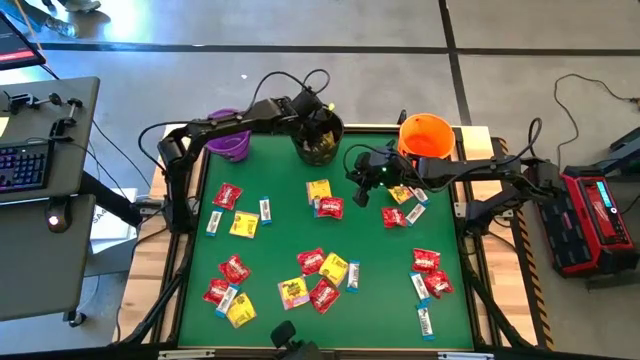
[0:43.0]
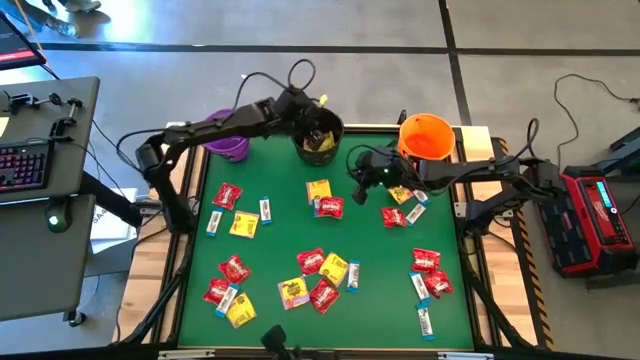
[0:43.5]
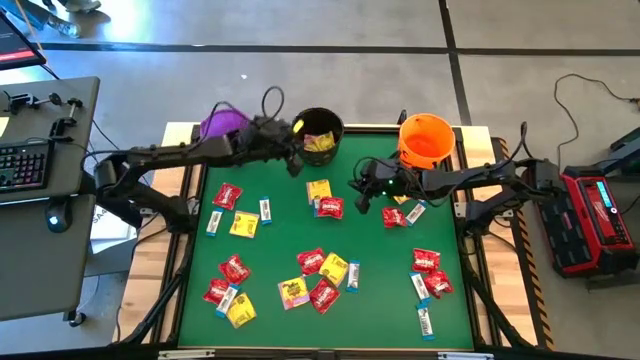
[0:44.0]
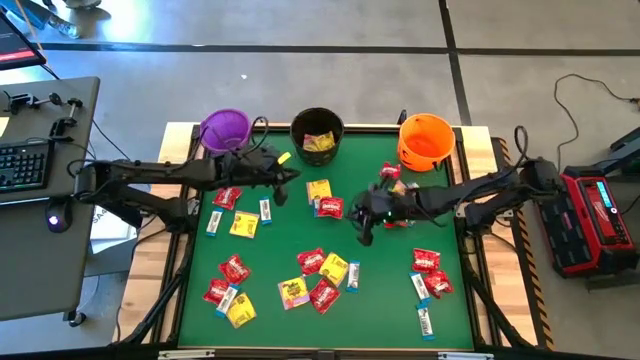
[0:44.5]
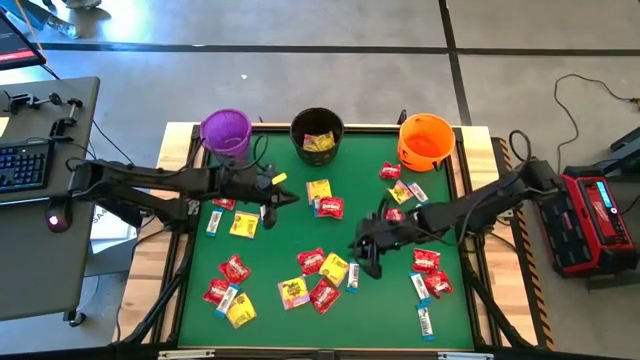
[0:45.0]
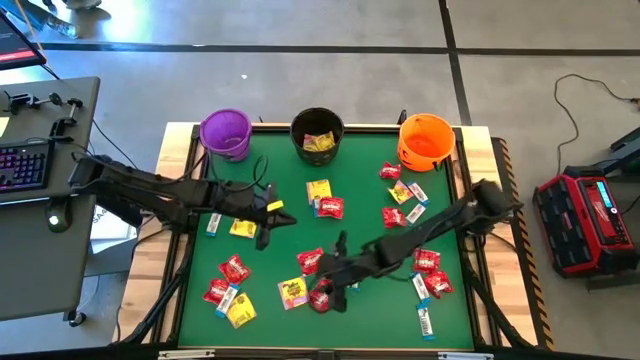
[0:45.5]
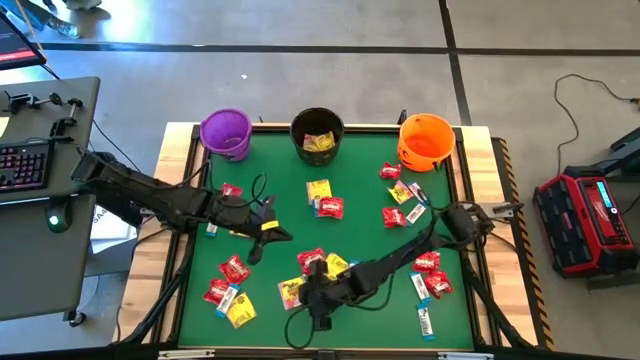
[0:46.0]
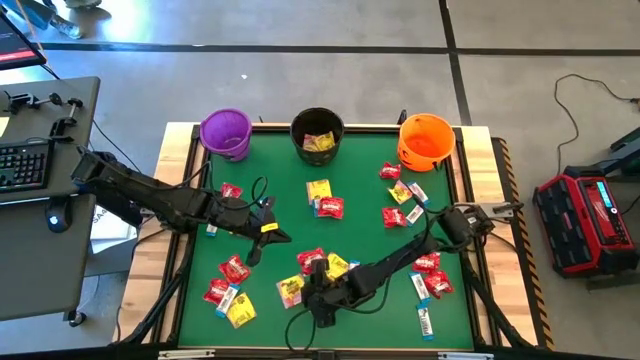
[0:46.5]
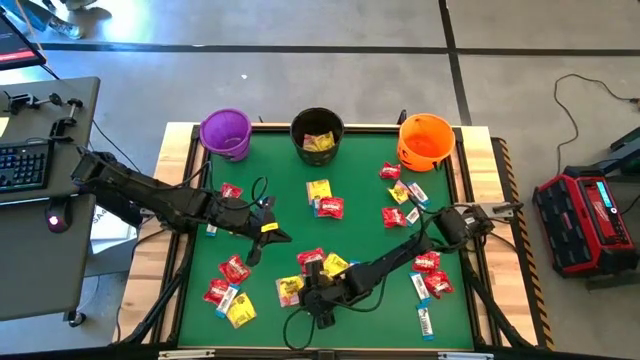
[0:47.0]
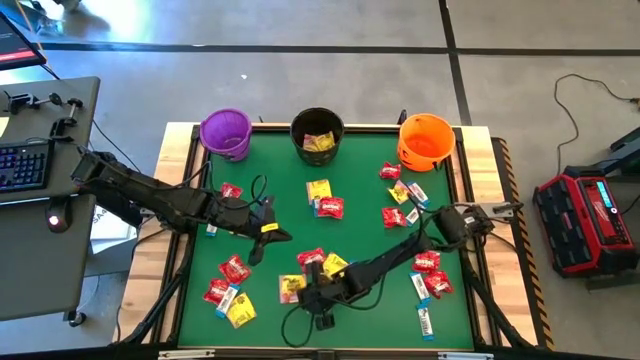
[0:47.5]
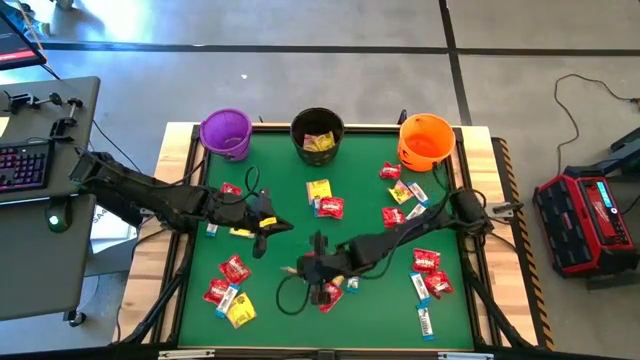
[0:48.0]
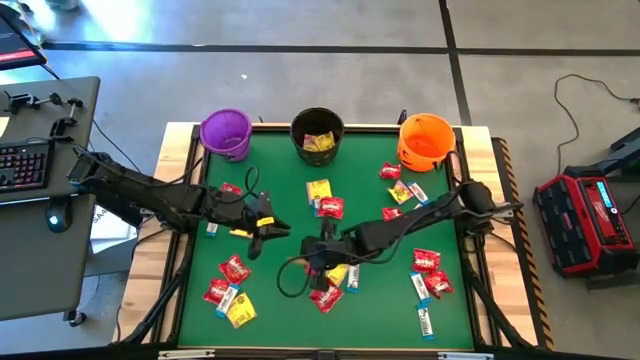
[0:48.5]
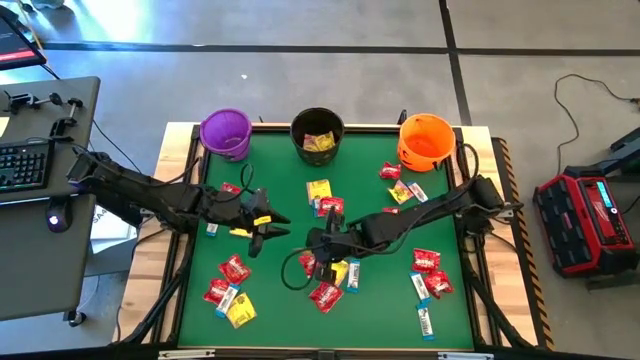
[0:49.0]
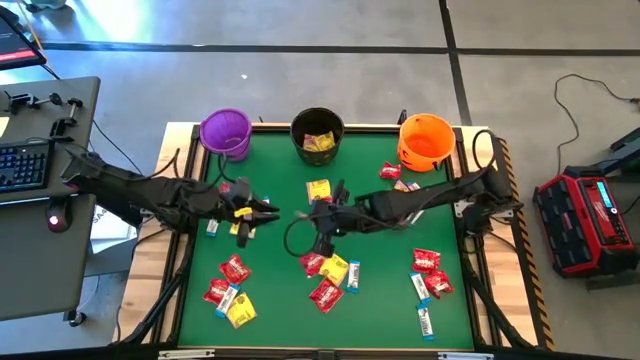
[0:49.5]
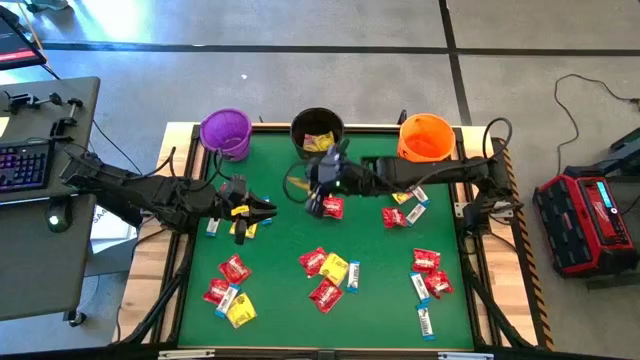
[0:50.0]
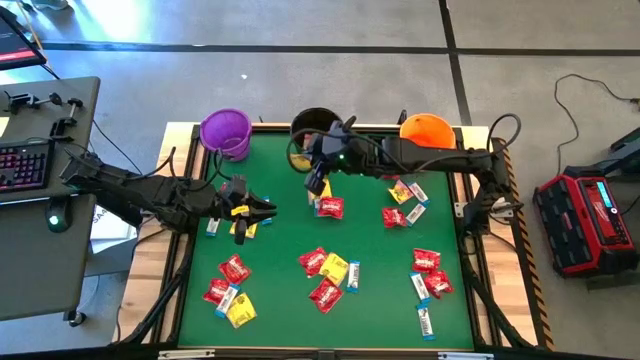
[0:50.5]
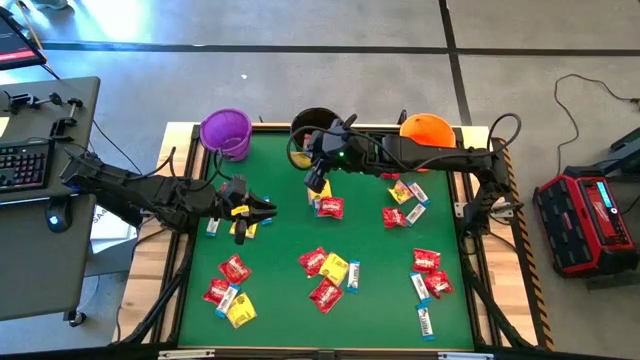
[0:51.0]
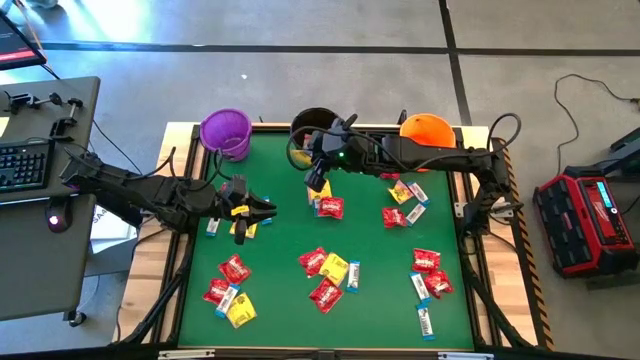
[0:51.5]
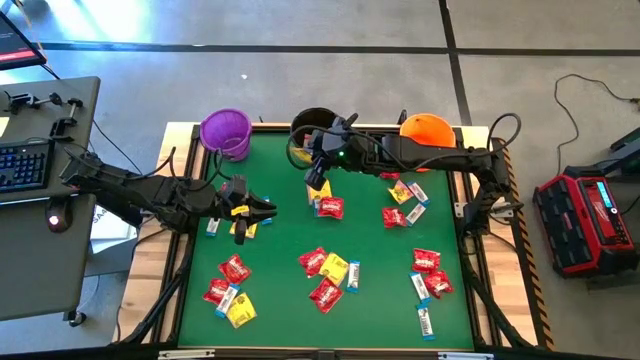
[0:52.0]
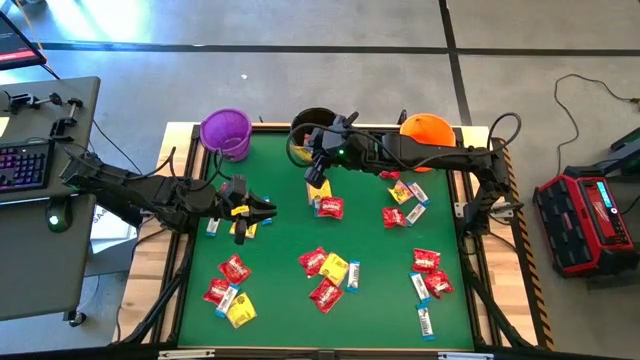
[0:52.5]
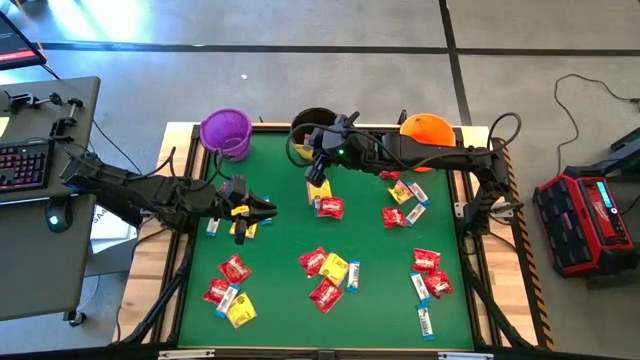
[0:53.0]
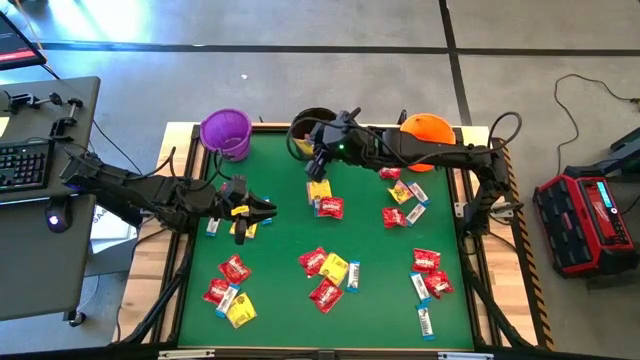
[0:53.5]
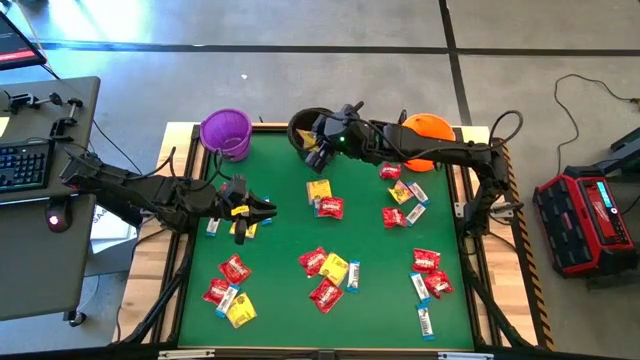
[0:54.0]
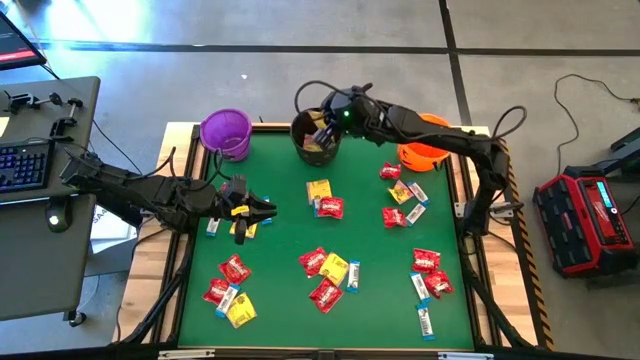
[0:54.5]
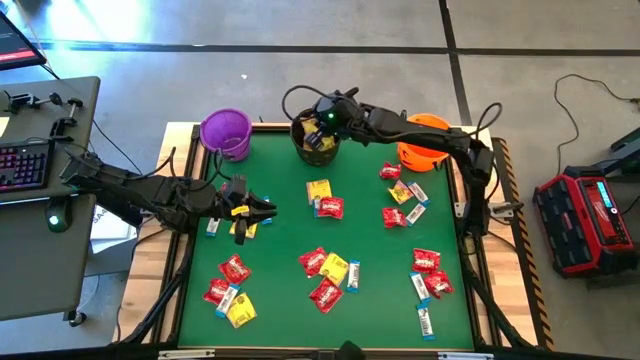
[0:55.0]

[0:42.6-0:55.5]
Task: Sort candy by brand, put in halloween buckets
Put the yellow candy pack into the black bucket

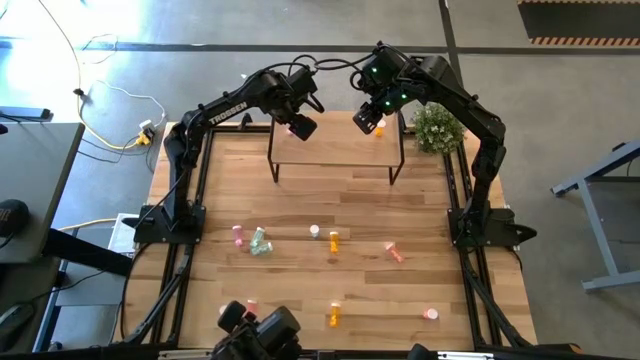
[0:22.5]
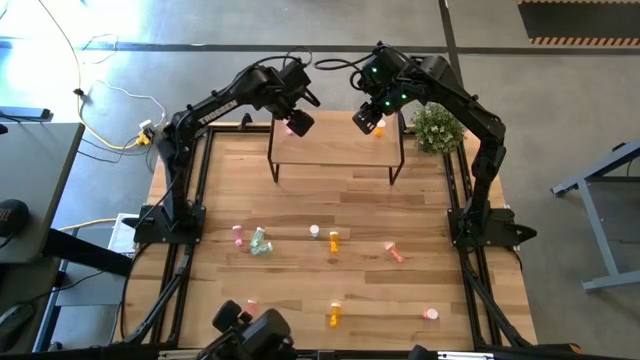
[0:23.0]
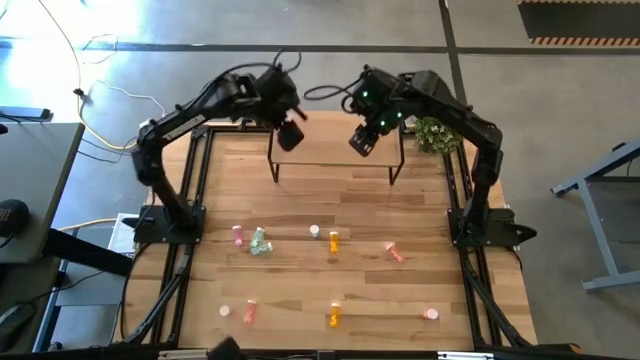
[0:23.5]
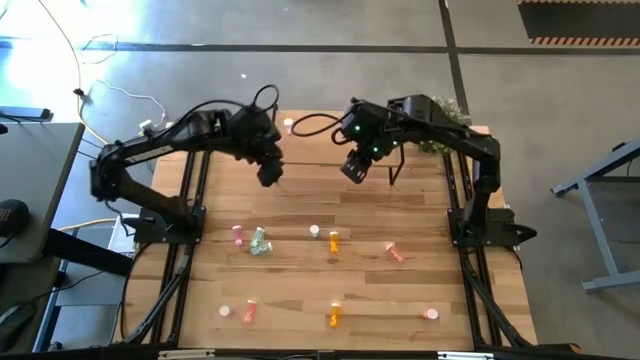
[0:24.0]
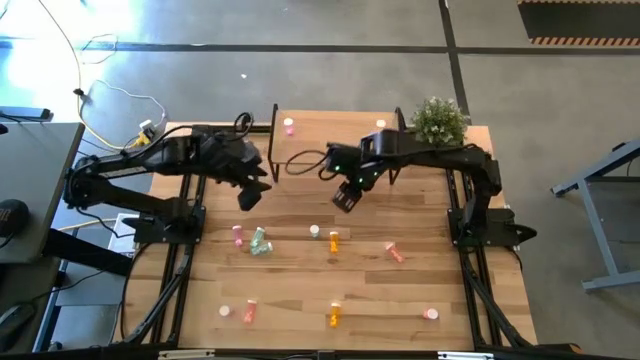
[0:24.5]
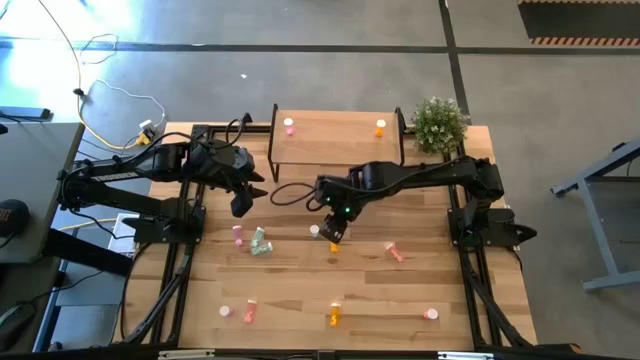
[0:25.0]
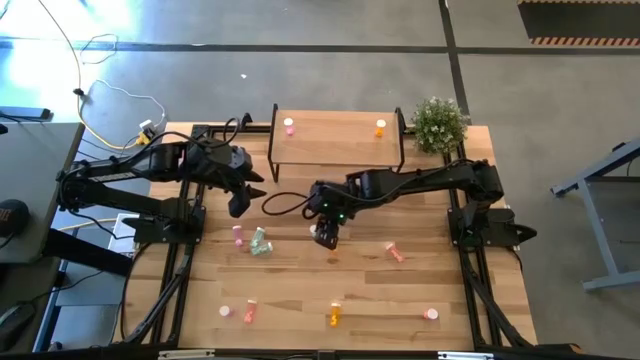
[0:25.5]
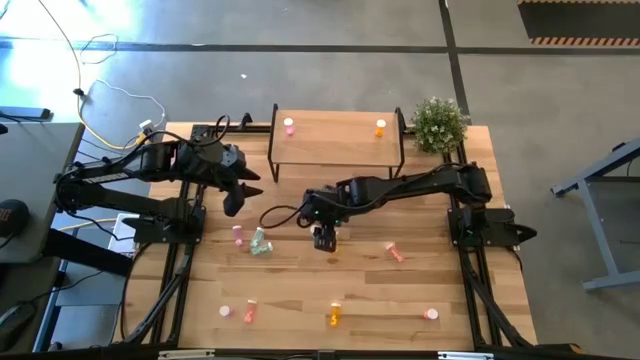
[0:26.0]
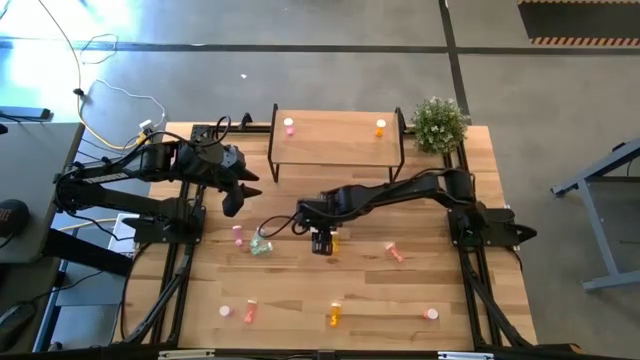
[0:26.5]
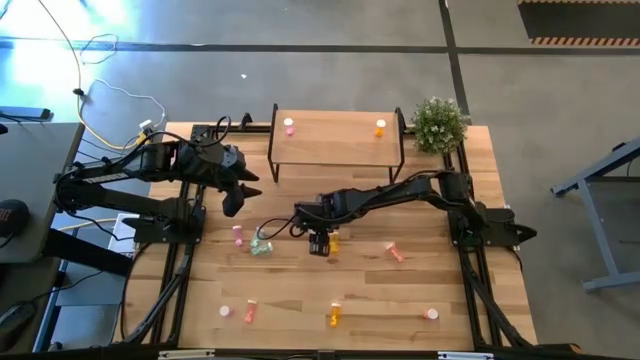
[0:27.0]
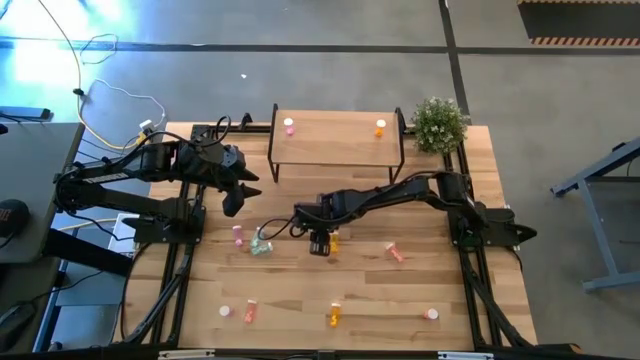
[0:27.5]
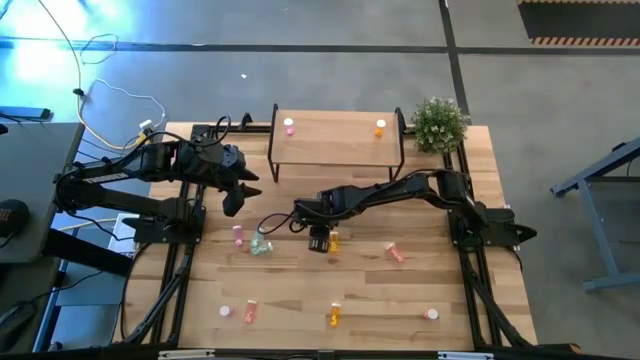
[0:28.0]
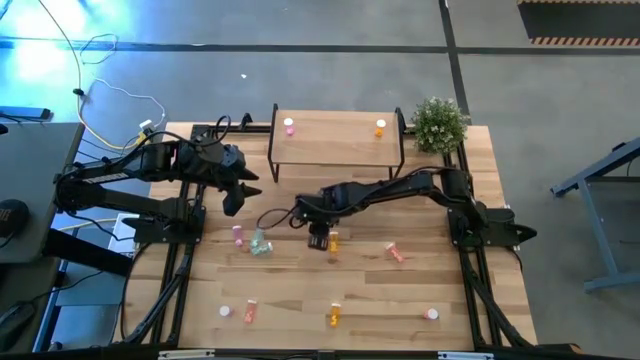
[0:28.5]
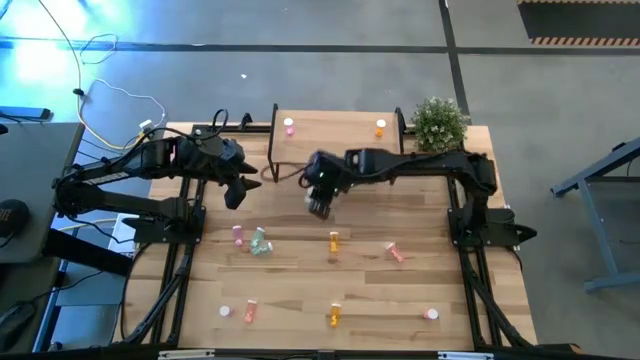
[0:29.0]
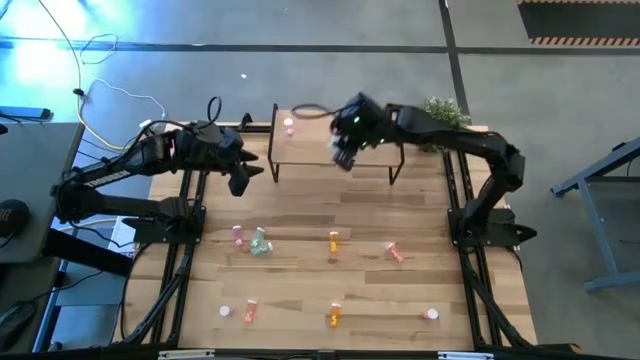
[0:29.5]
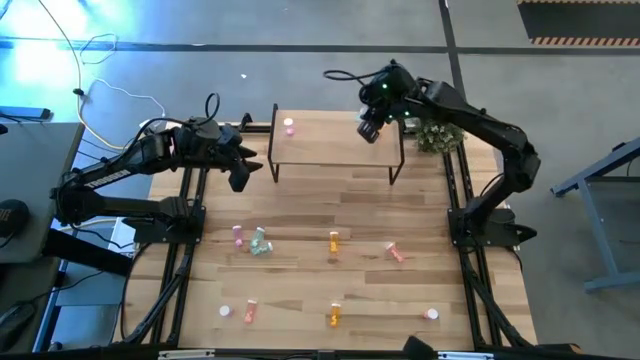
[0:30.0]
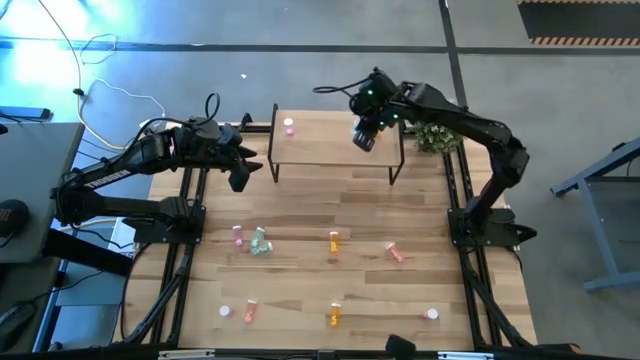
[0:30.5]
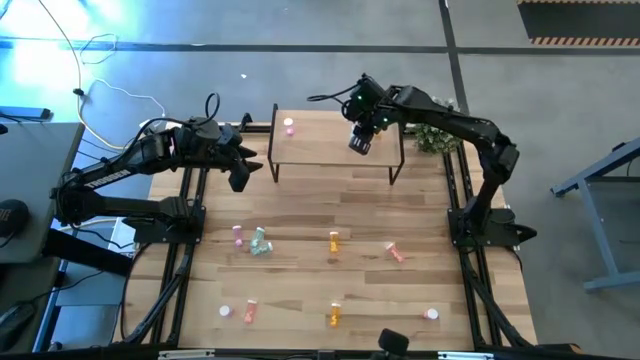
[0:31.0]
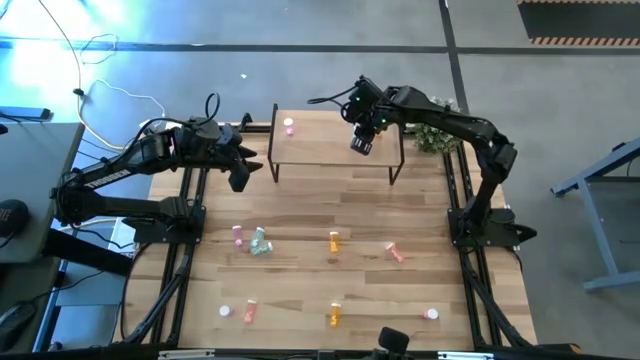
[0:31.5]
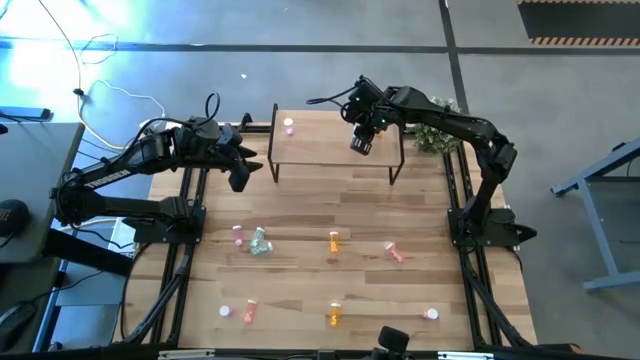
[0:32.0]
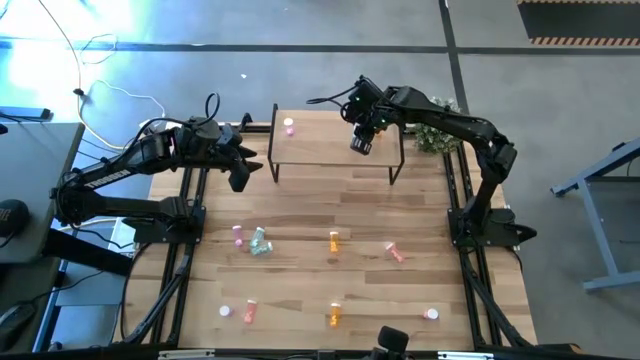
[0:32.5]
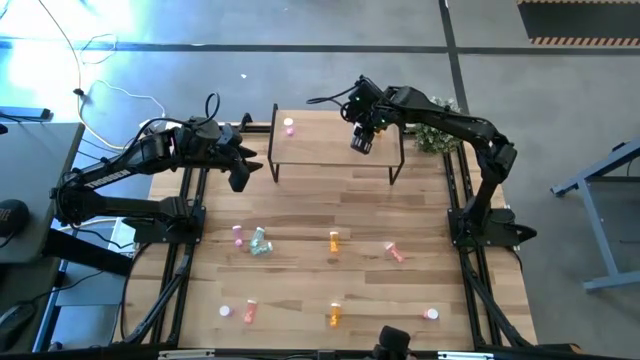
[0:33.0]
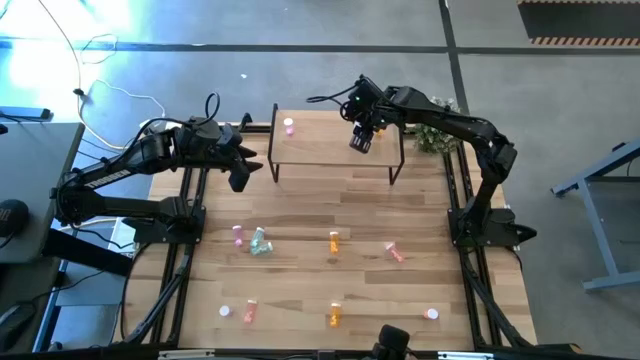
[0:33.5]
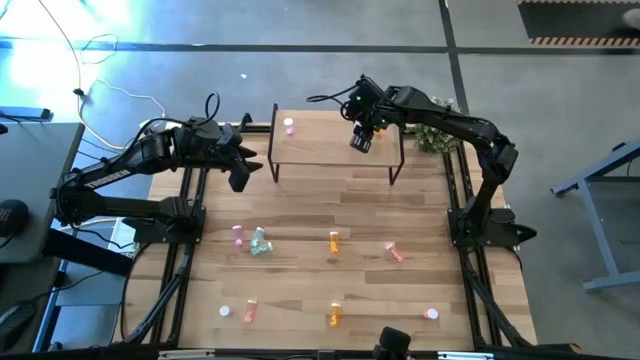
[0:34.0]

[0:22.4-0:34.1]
Task: Pick and place medicine bottles onto shelf by color
Put the top right blue pill bottle on the shelf
